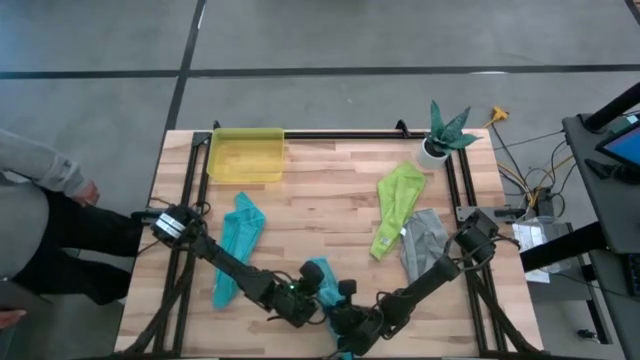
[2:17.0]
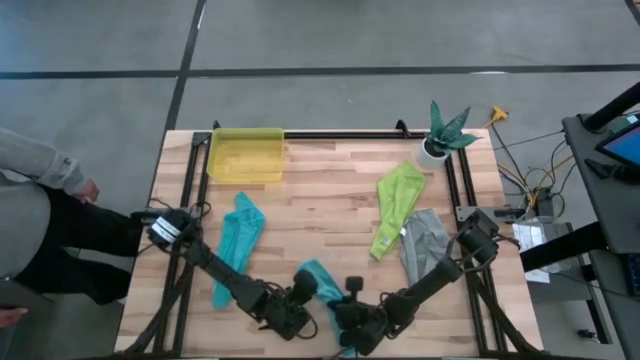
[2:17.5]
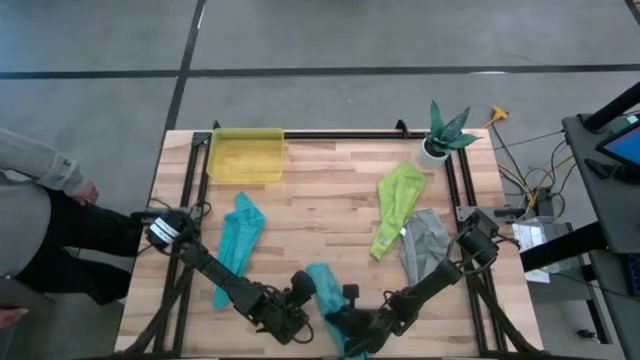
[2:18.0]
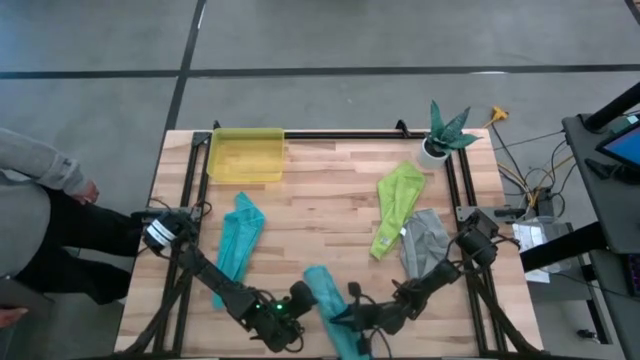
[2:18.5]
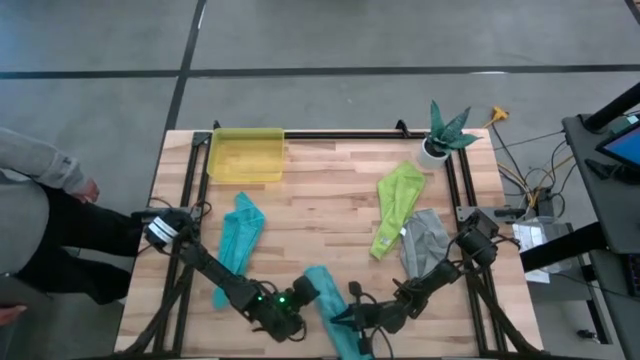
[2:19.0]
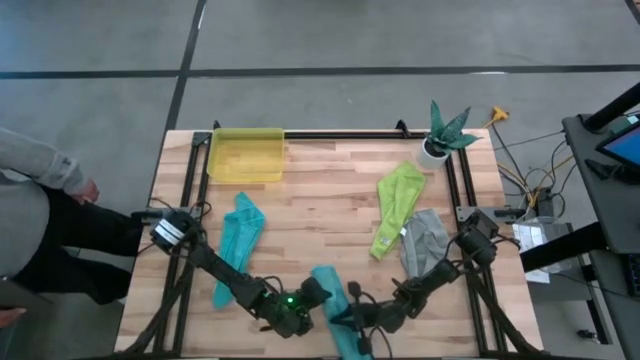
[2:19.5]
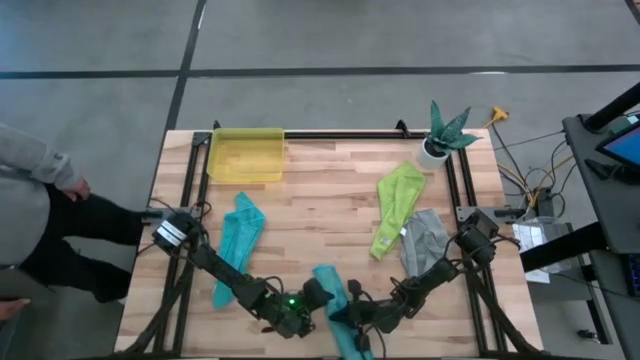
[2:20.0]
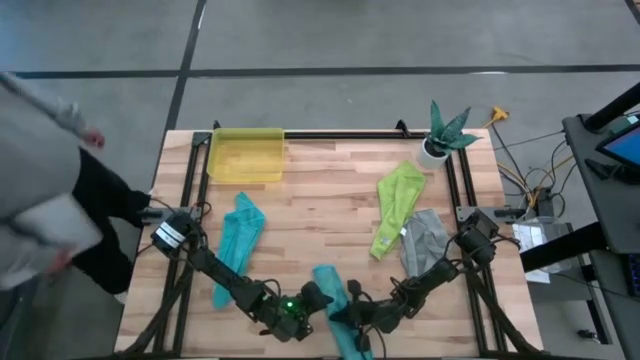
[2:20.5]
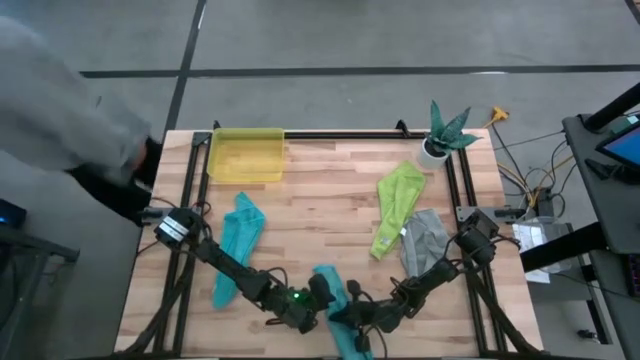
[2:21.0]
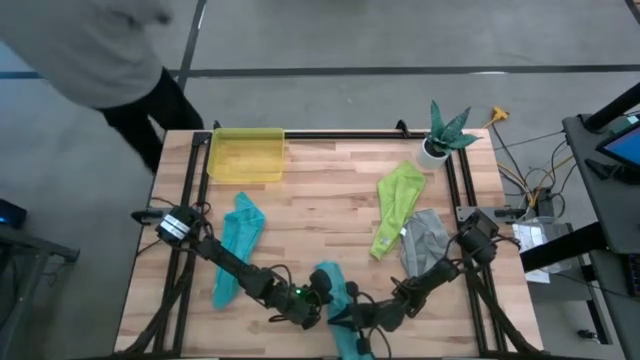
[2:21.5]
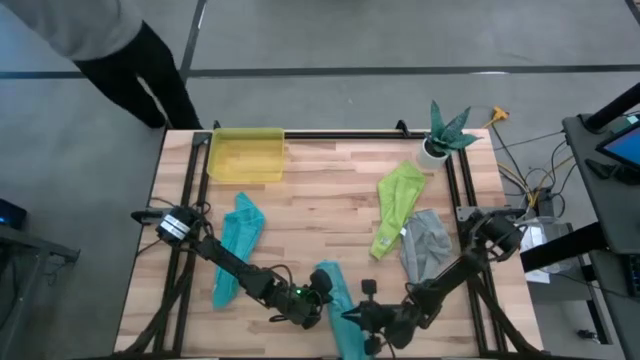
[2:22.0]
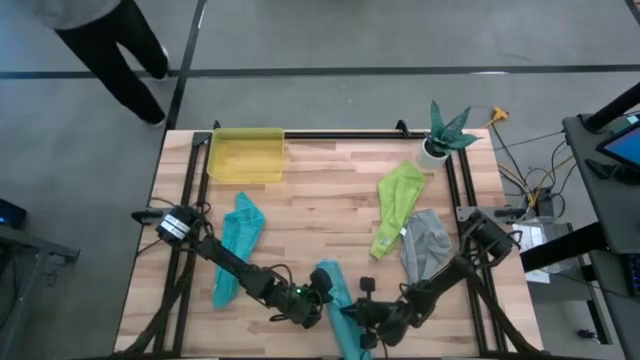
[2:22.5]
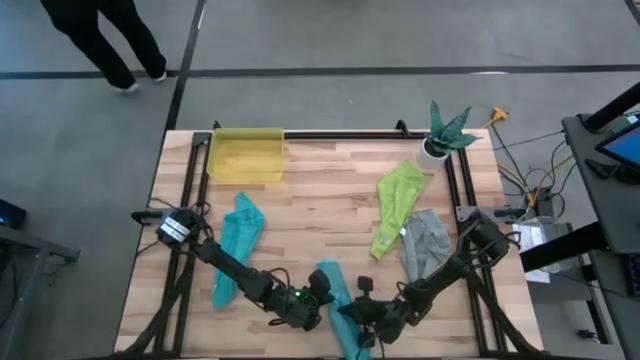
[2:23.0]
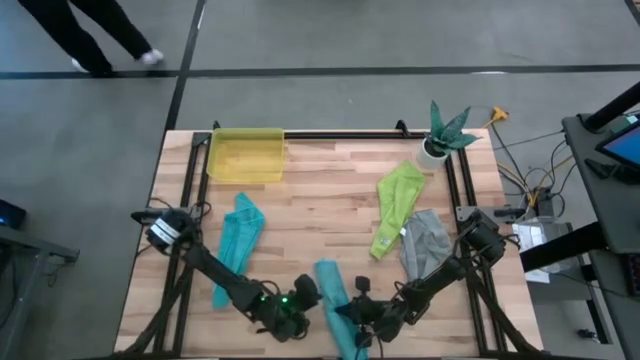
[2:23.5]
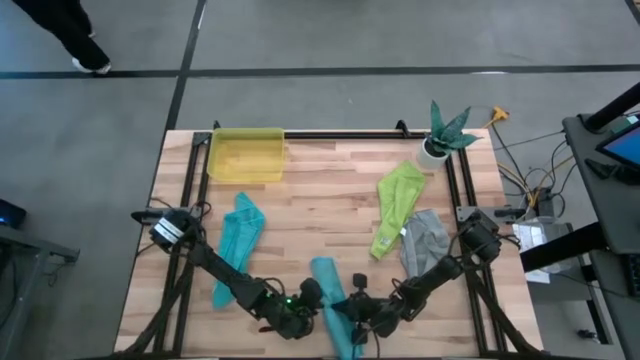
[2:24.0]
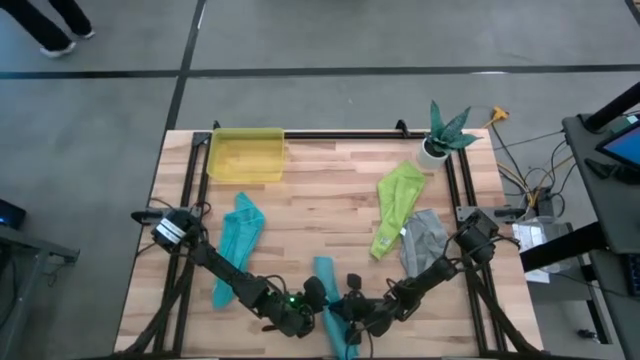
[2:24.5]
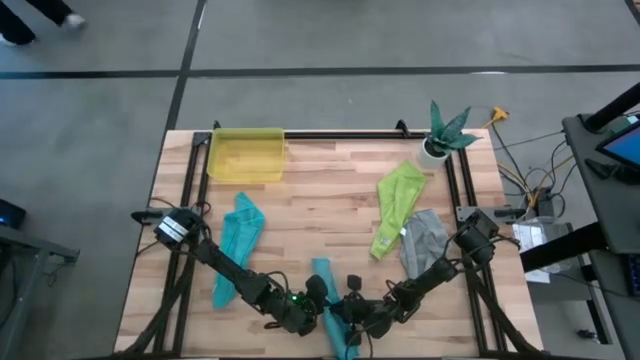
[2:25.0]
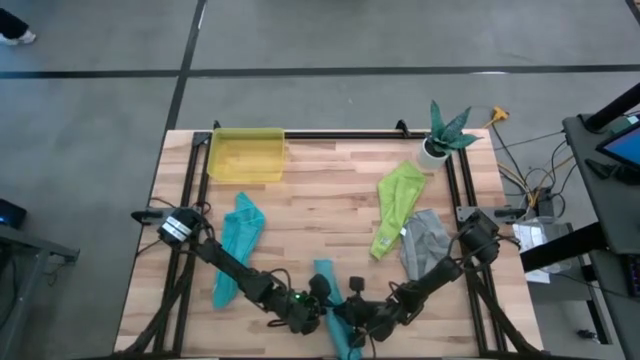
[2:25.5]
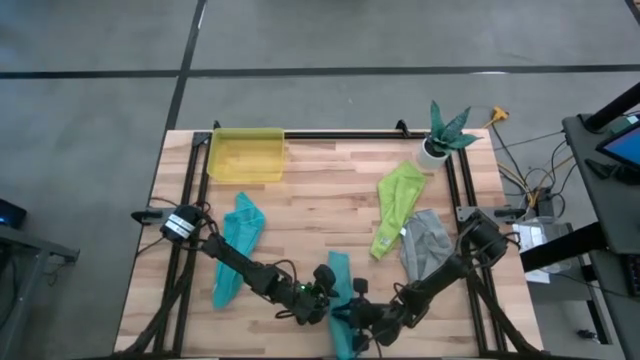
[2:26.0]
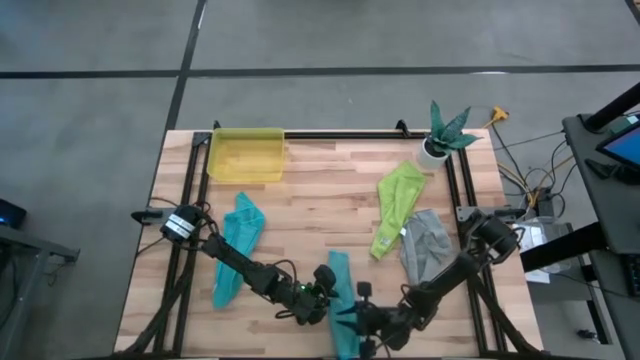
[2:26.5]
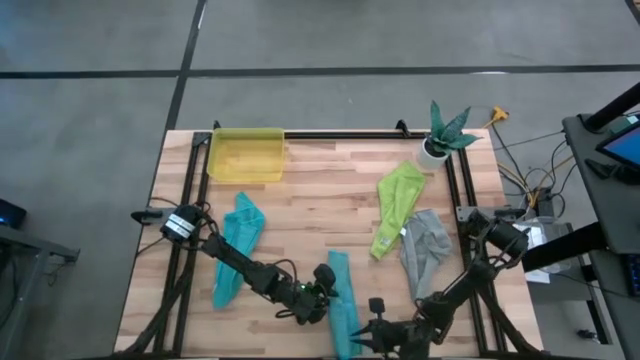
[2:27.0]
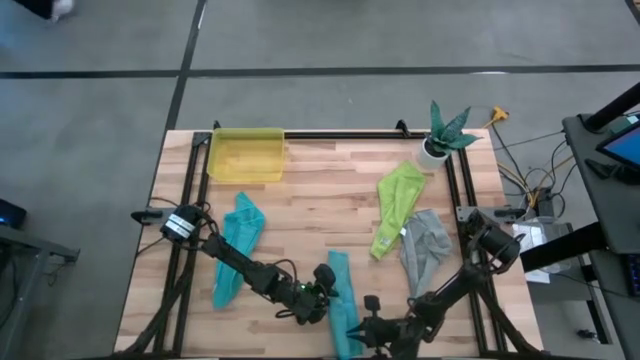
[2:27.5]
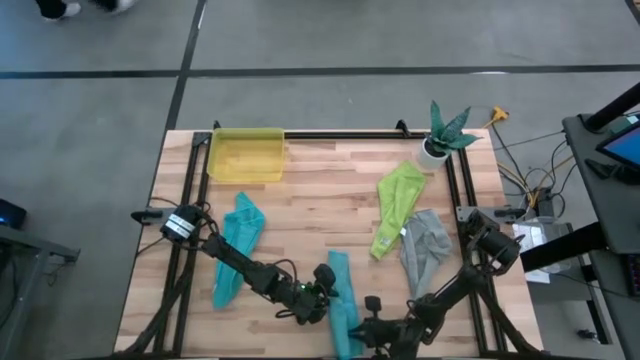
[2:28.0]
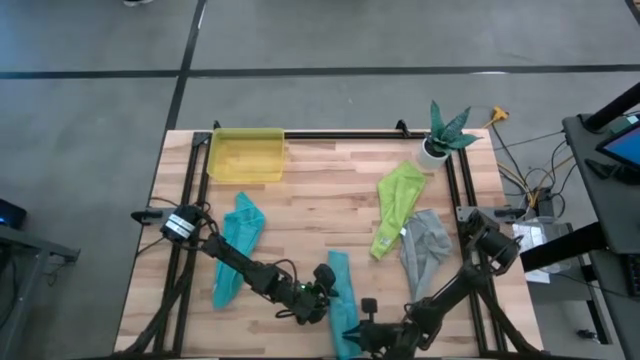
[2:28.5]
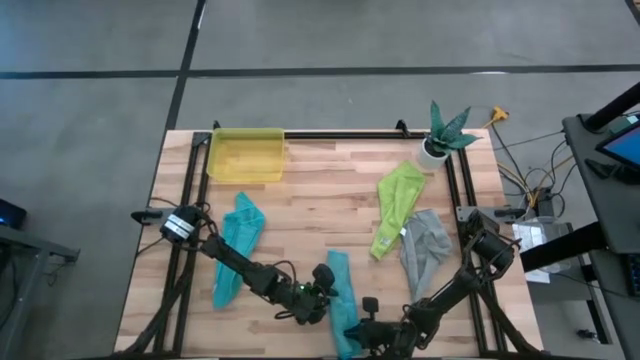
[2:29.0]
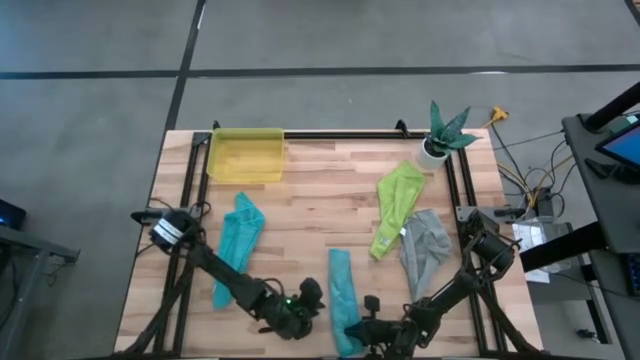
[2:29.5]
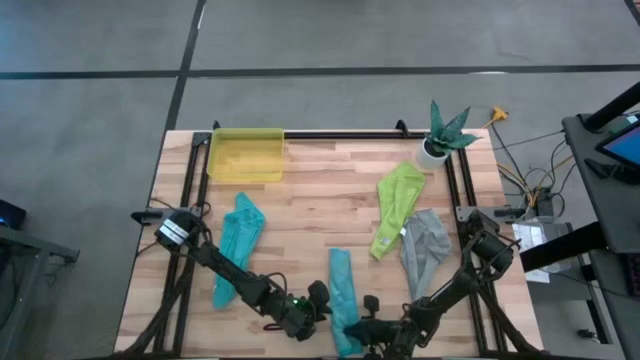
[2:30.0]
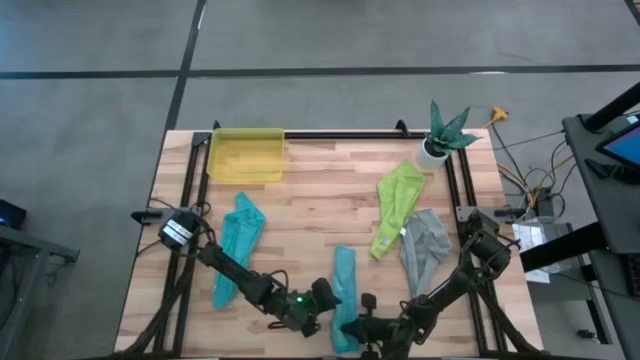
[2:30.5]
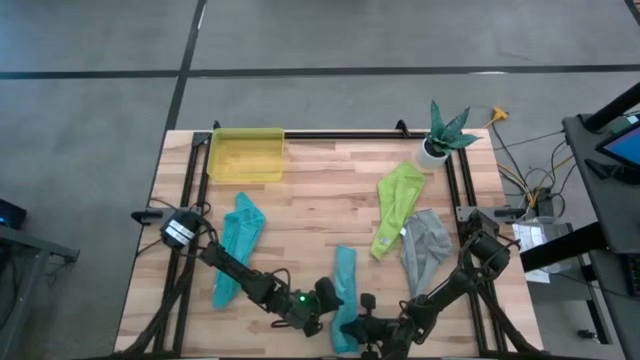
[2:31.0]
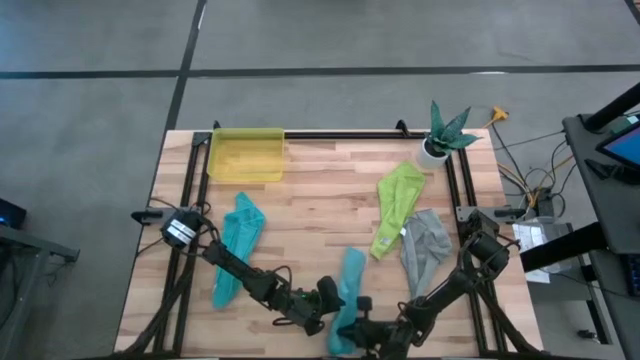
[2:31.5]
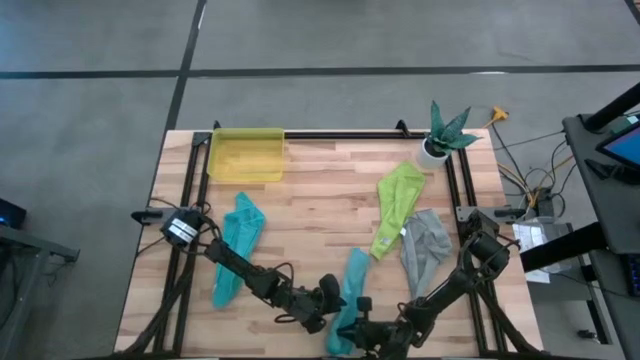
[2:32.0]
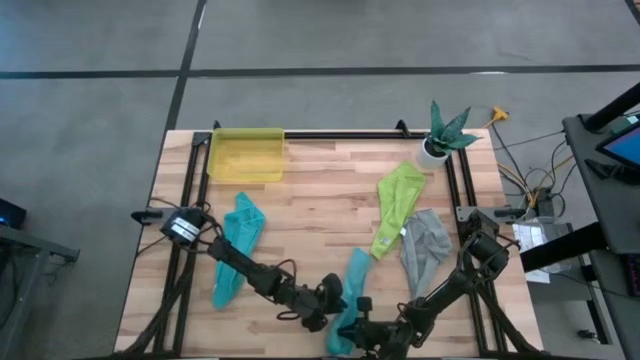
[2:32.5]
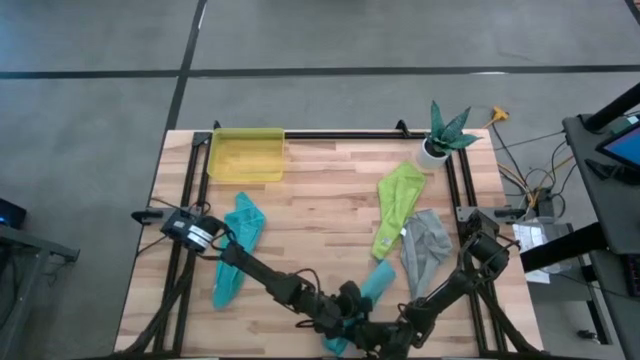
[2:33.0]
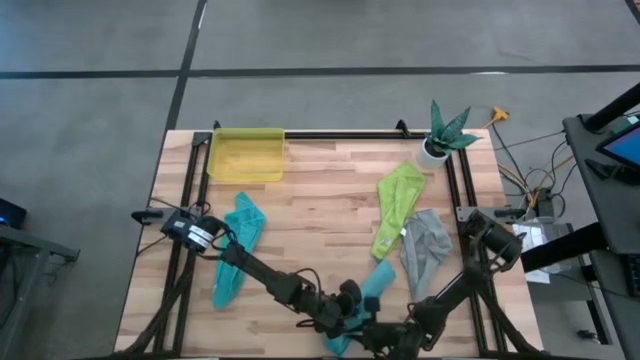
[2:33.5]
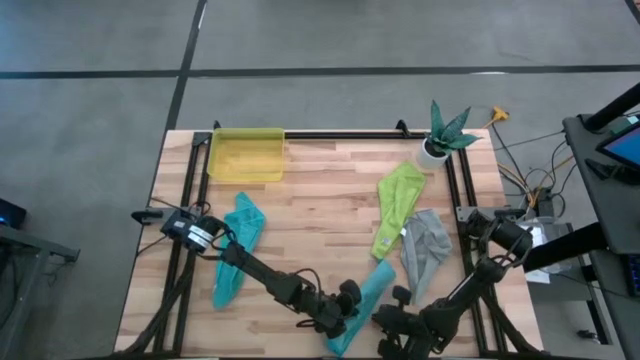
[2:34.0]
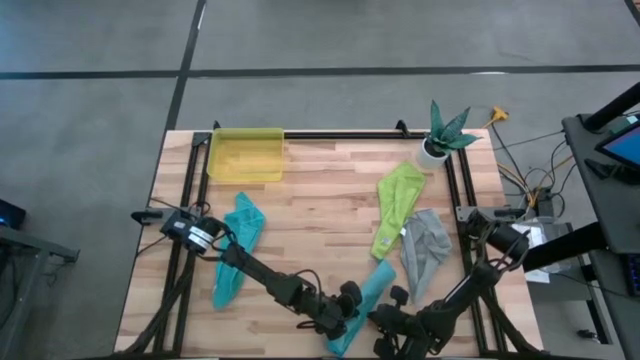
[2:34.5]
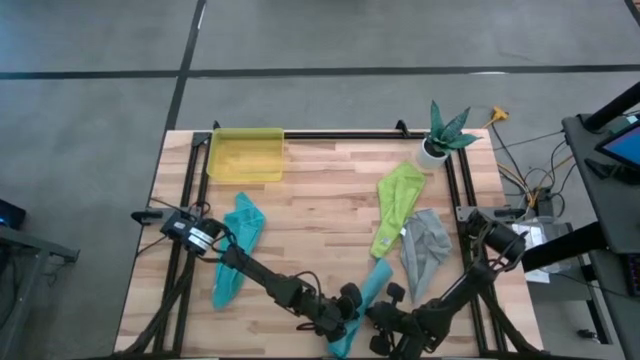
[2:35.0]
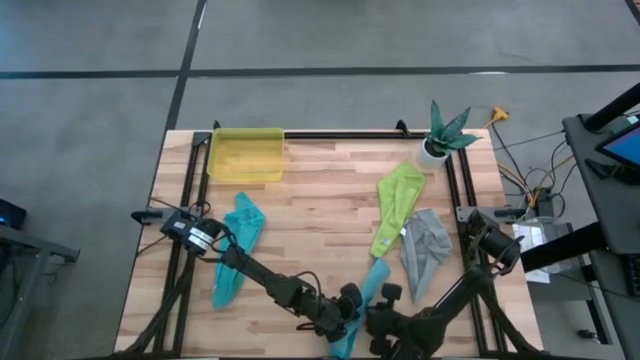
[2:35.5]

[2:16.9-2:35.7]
Task: Roll microfiber towels into tight, uniform cylinder then place into a basket
Roll the right light blue towel
